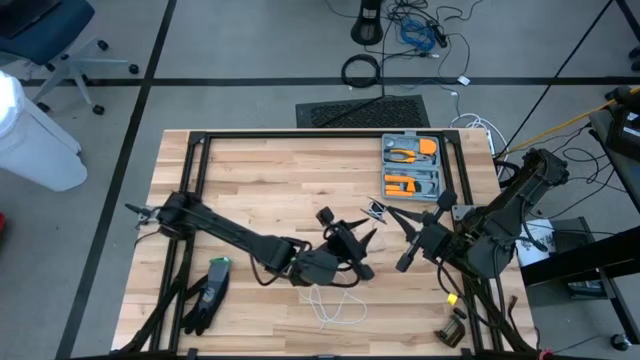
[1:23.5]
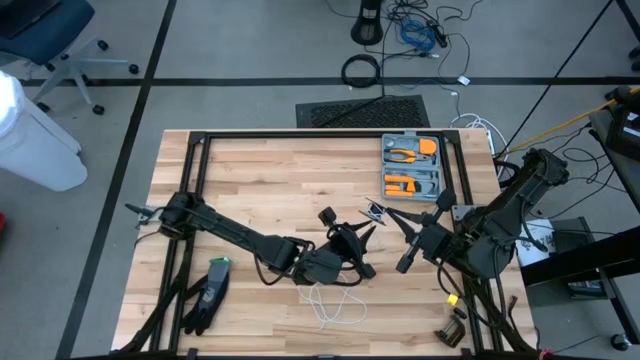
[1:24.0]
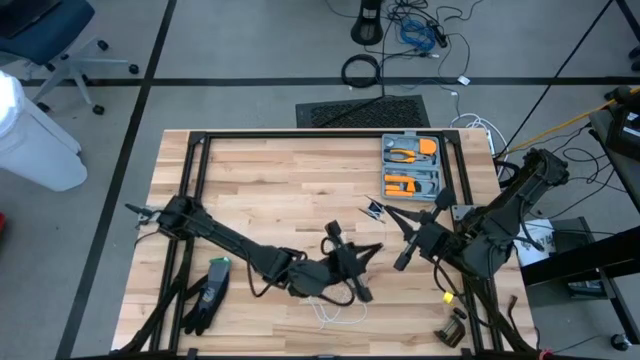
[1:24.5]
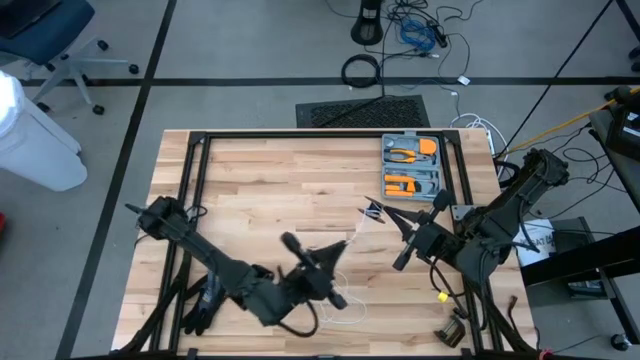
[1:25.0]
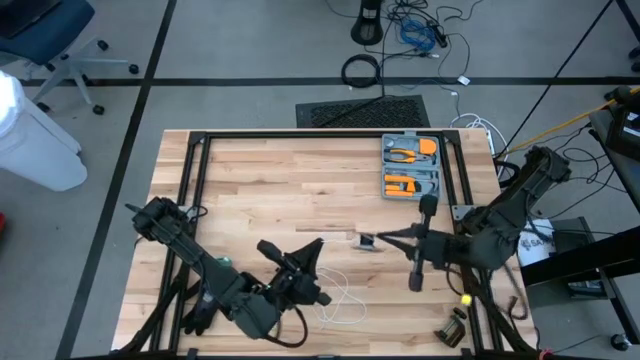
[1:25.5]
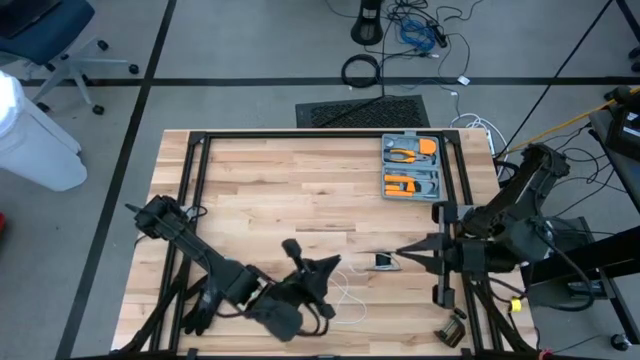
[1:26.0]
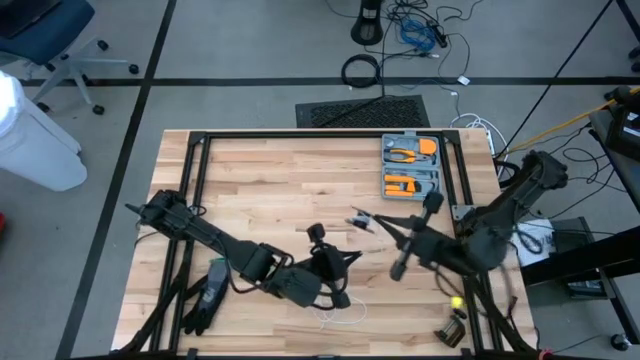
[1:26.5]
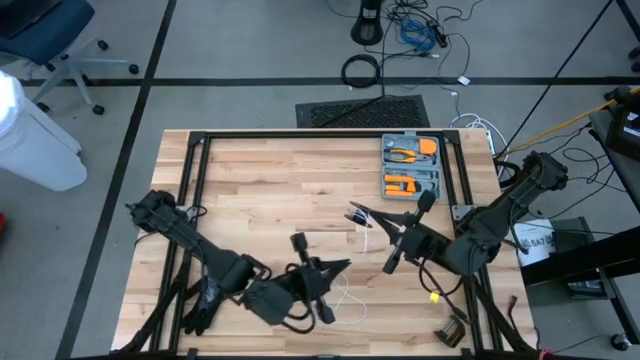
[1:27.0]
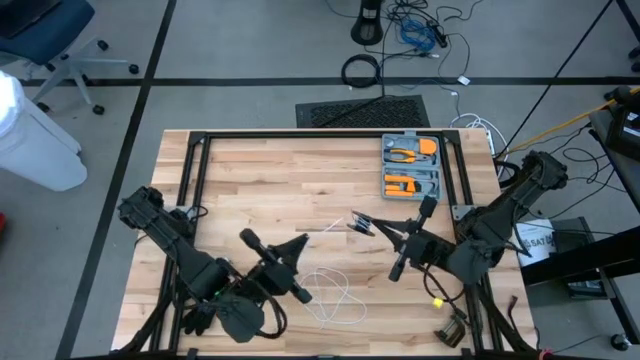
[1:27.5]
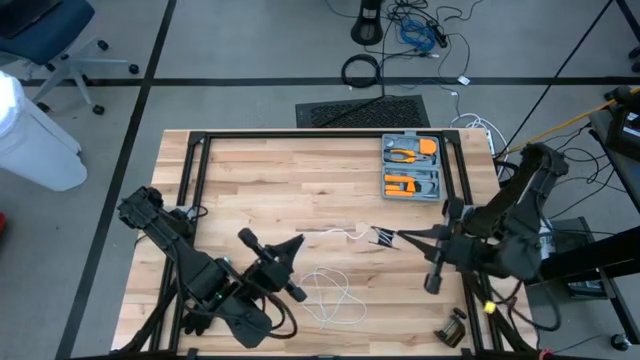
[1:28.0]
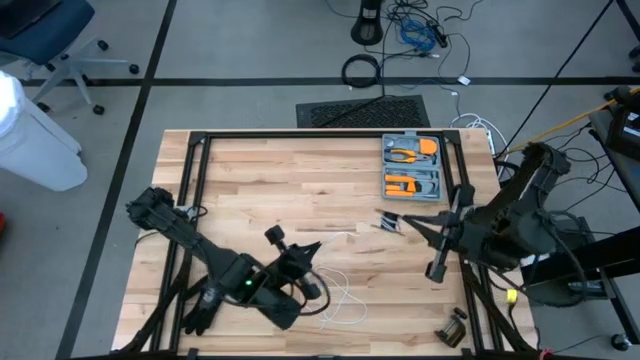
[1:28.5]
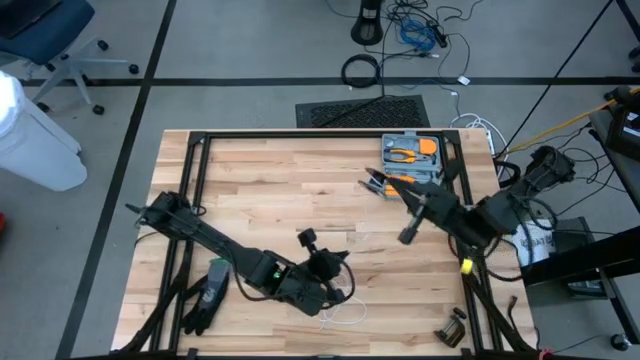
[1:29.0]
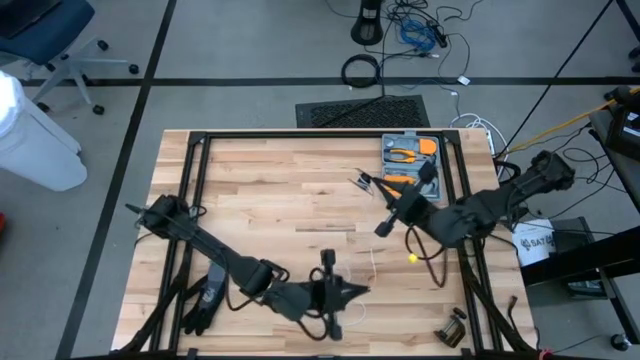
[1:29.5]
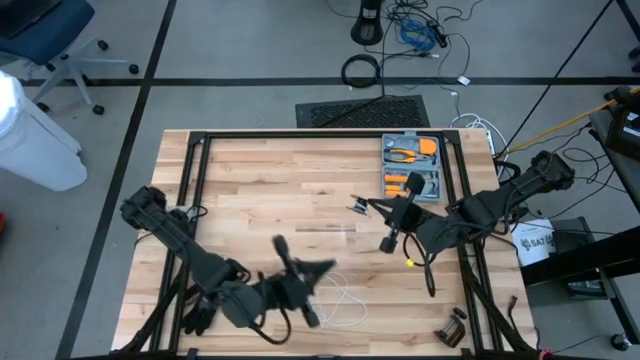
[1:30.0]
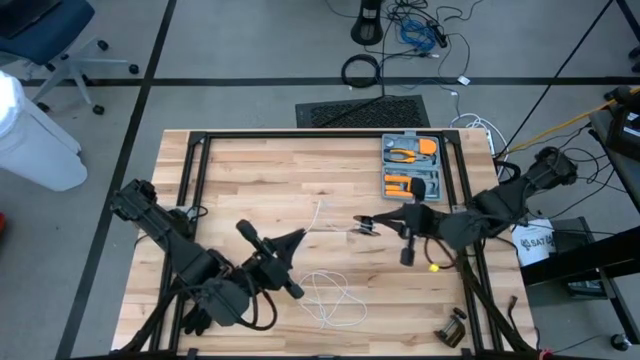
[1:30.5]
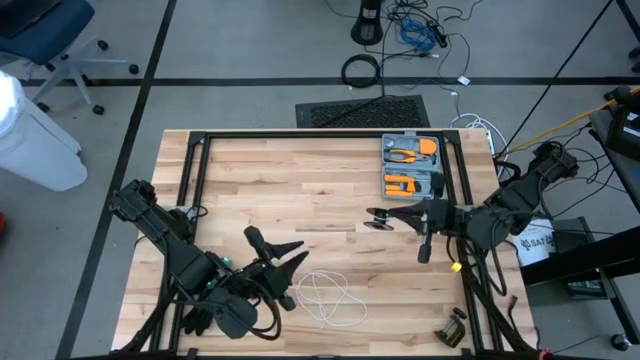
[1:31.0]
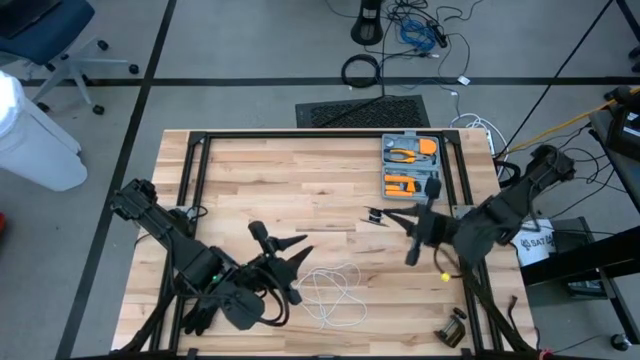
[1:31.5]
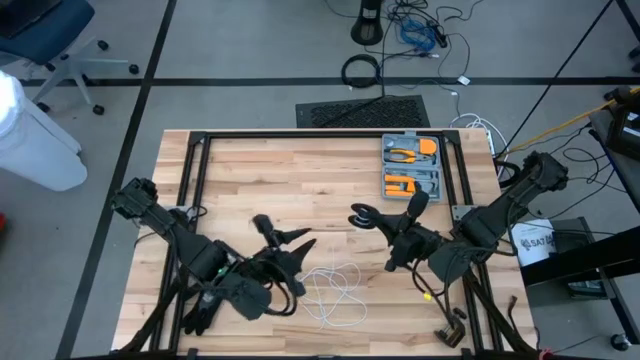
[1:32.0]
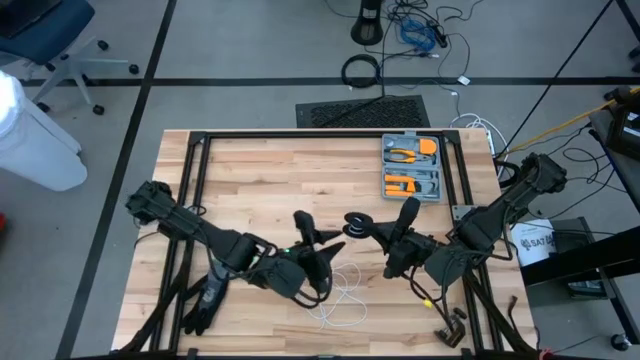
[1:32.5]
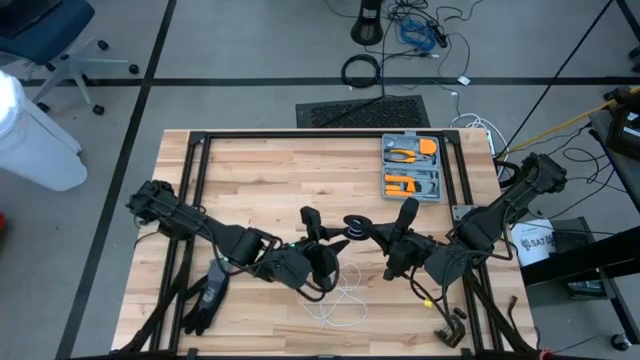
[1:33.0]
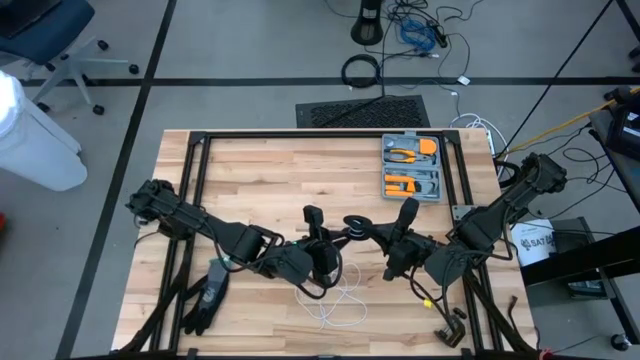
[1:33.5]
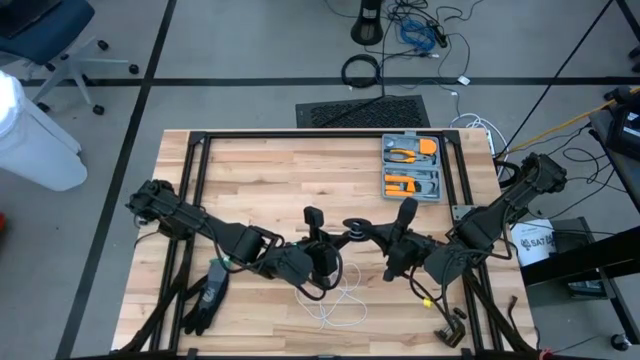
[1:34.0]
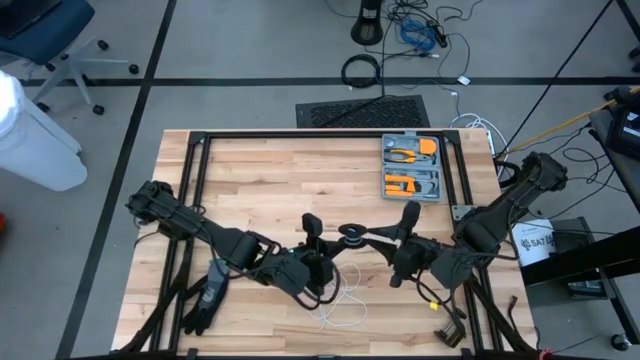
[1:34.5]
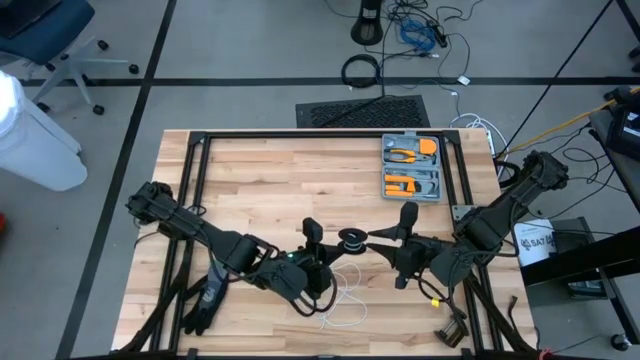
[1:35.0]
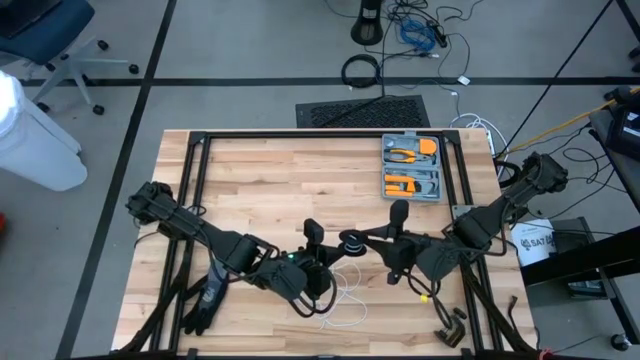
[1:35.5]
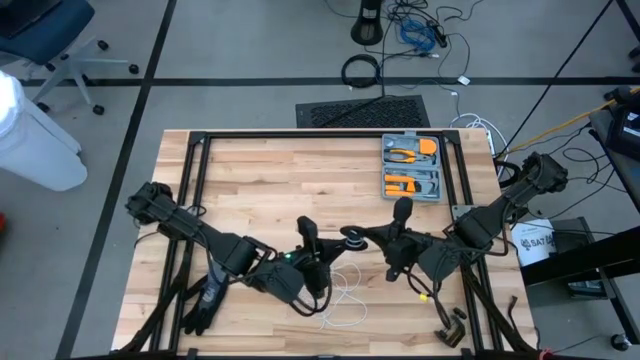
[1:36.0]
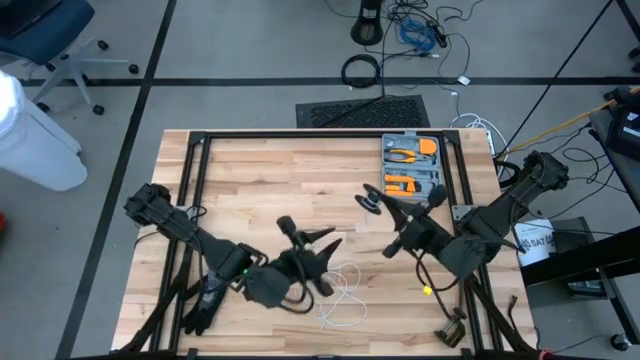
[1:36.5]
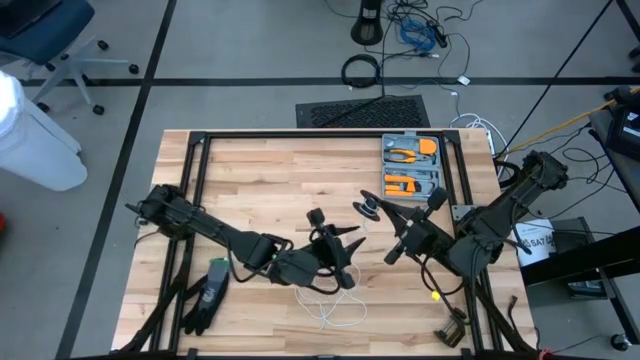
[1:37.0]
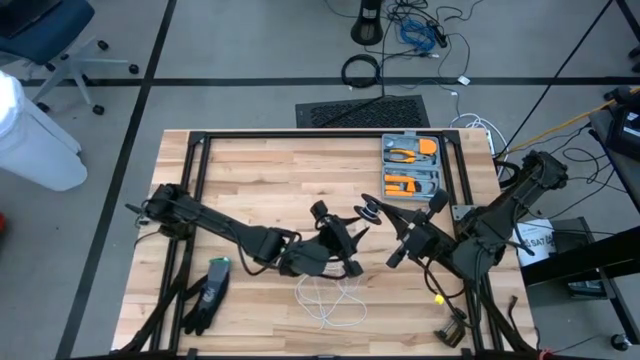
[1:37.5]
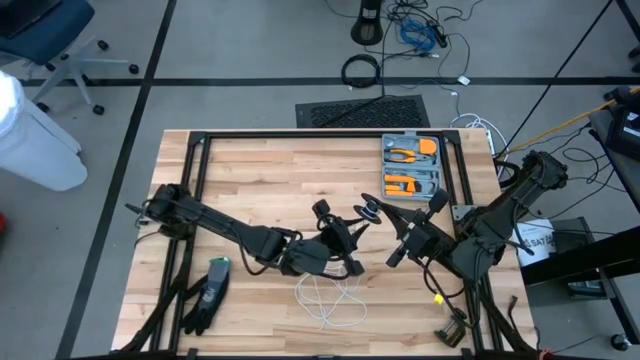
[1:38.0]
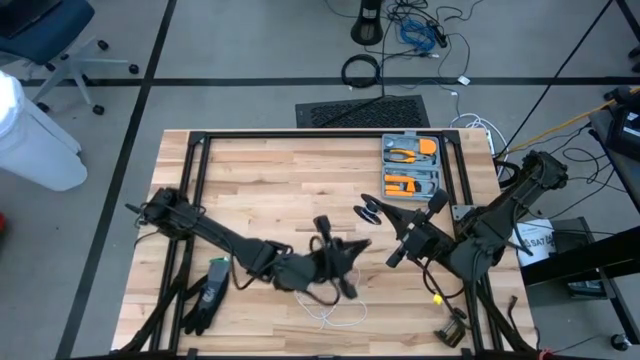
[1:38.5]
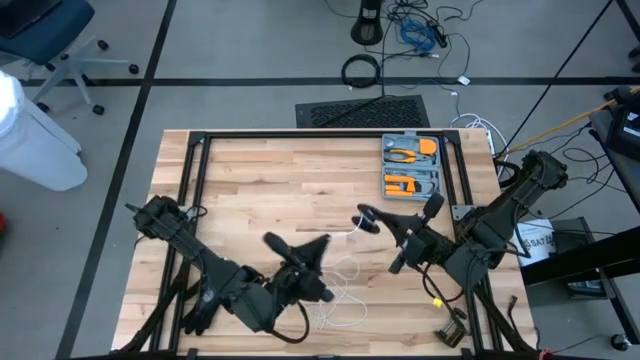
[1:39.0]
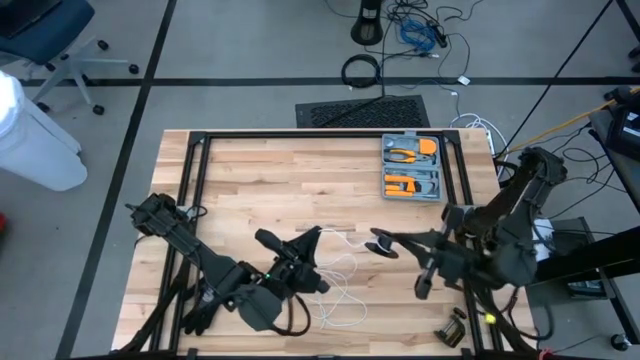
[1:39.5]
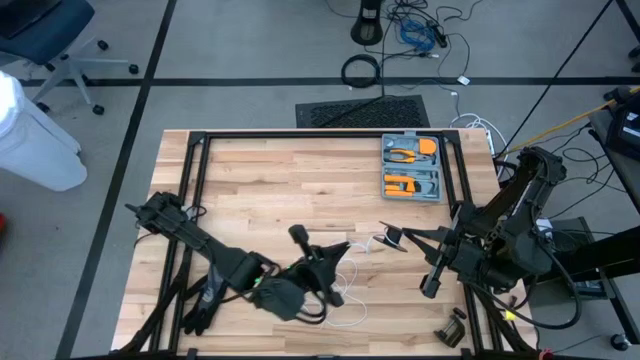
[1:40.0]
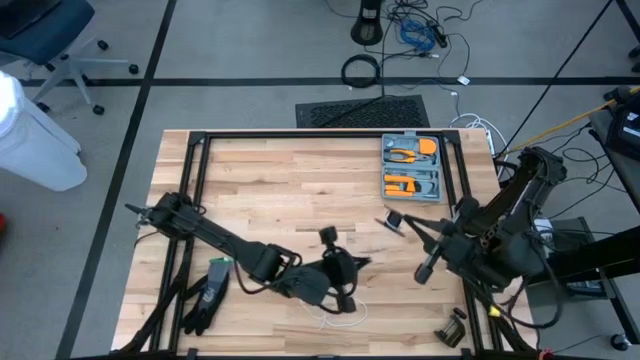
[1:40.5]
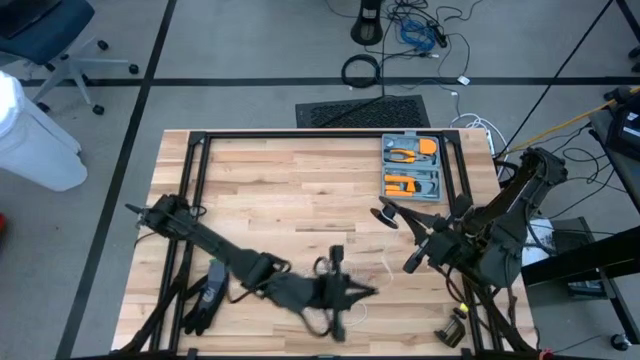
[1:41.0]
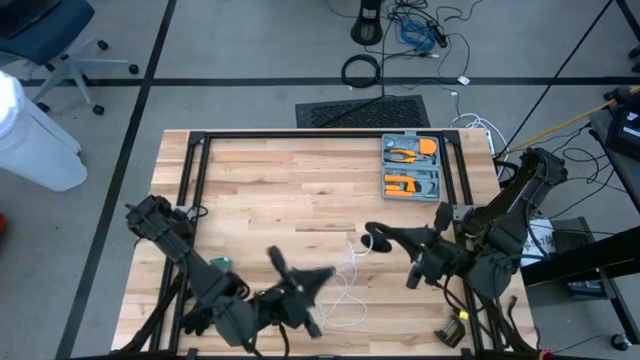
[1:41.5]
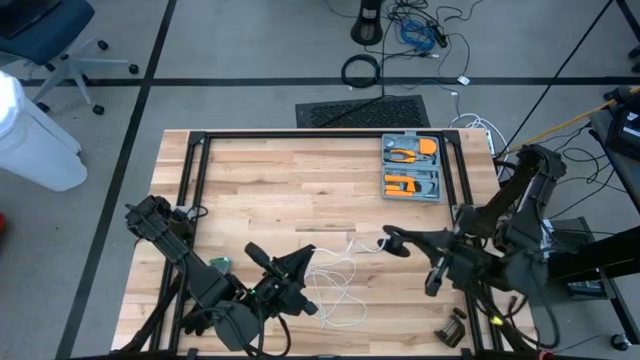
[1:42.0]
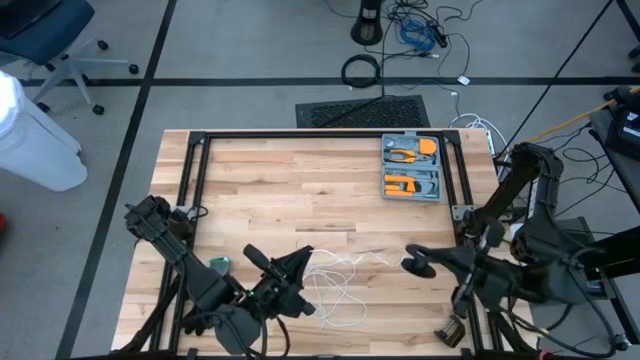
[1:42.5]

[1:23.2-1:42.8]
Task: Coil cords
Uncoil the white wire from the spool
